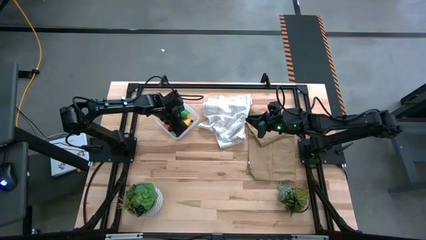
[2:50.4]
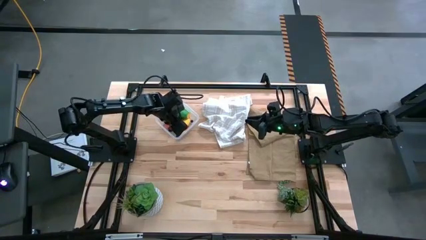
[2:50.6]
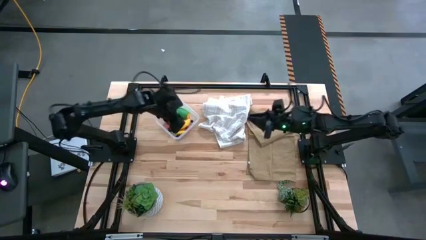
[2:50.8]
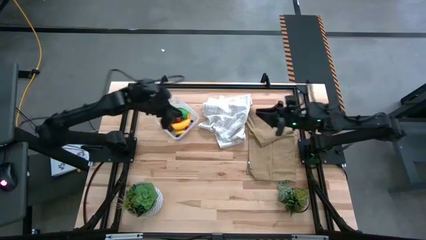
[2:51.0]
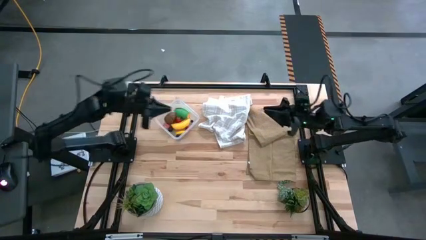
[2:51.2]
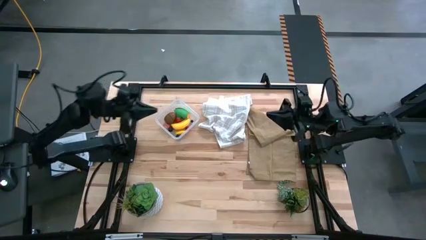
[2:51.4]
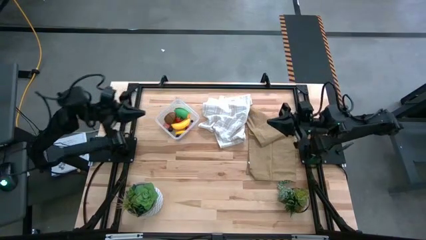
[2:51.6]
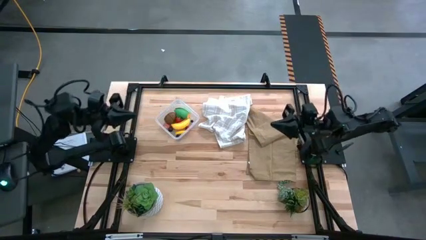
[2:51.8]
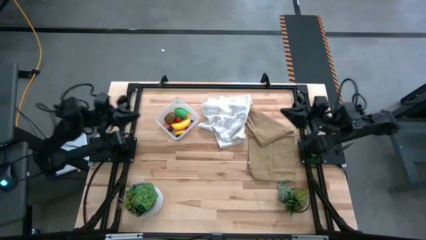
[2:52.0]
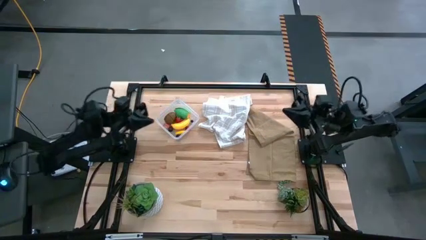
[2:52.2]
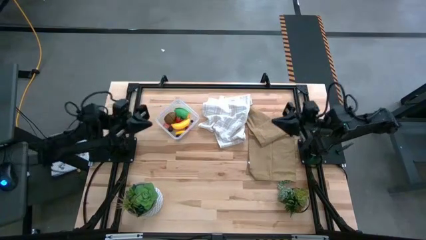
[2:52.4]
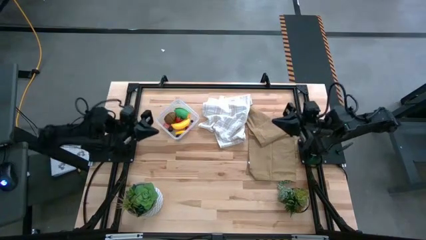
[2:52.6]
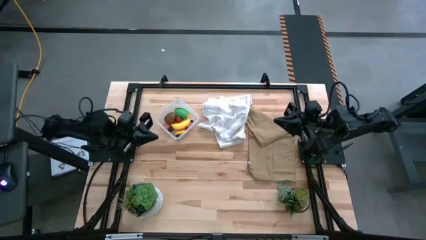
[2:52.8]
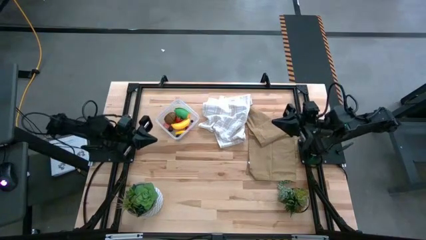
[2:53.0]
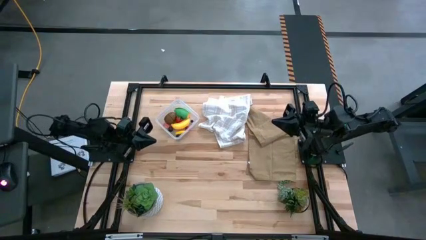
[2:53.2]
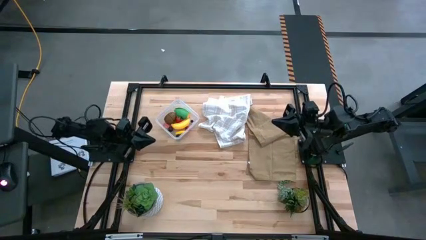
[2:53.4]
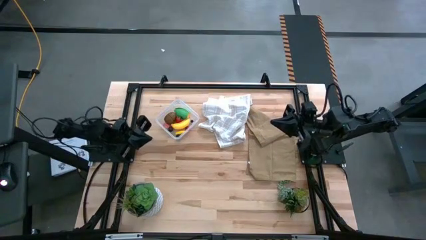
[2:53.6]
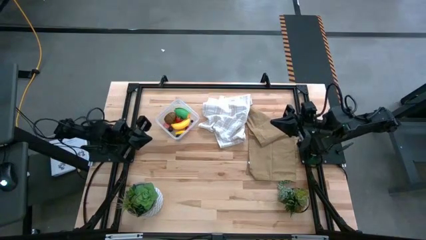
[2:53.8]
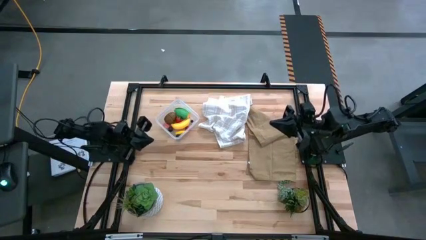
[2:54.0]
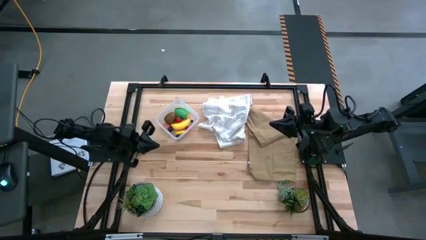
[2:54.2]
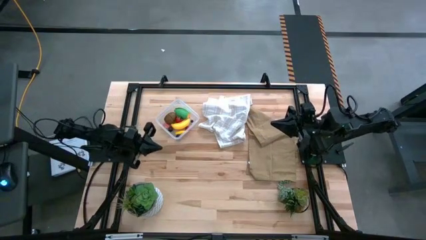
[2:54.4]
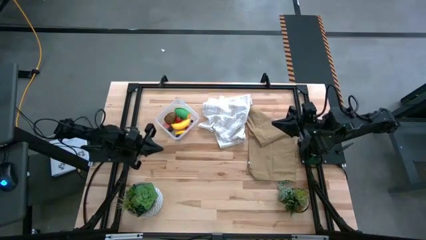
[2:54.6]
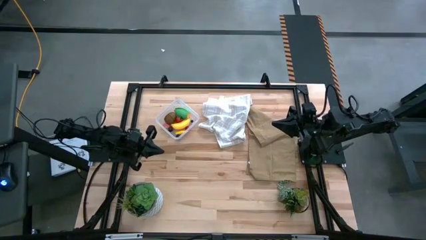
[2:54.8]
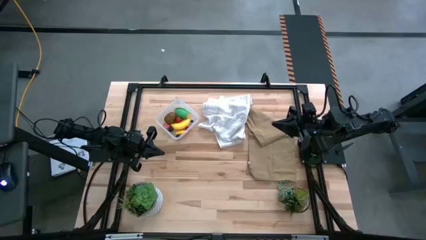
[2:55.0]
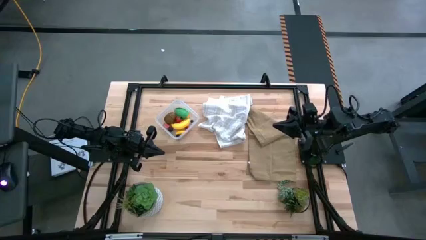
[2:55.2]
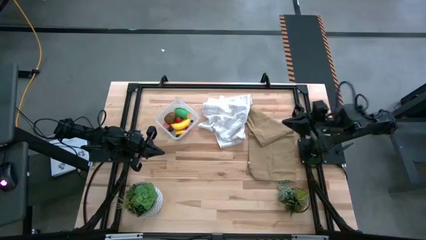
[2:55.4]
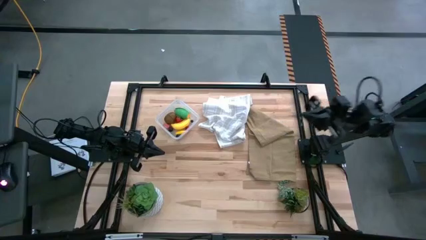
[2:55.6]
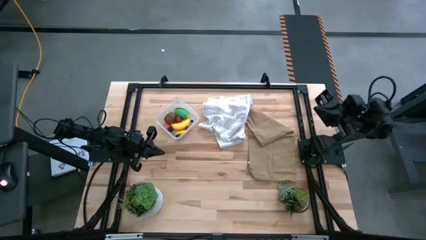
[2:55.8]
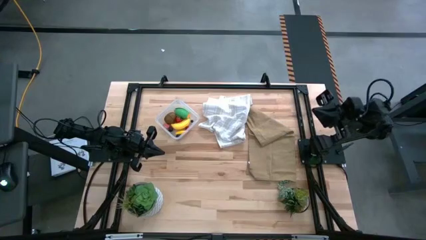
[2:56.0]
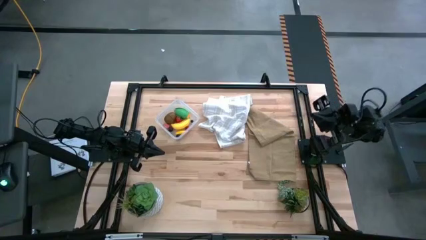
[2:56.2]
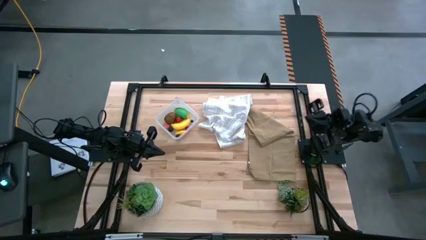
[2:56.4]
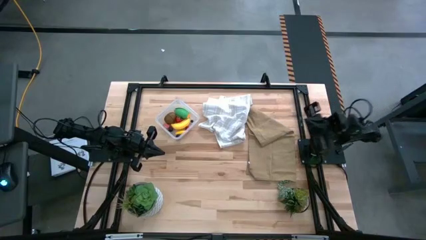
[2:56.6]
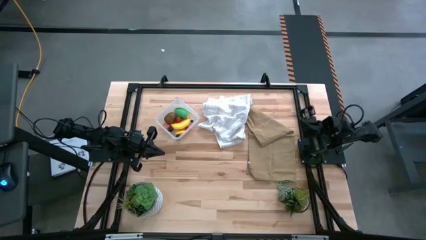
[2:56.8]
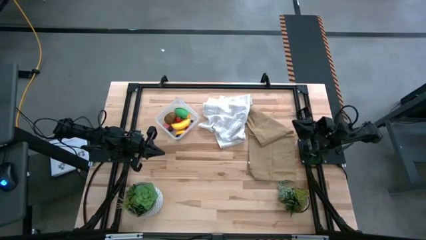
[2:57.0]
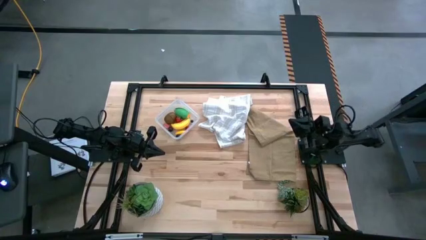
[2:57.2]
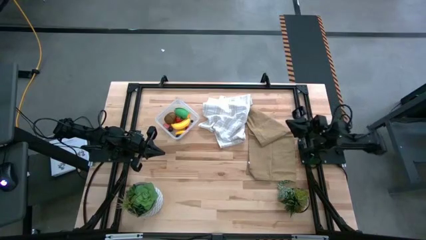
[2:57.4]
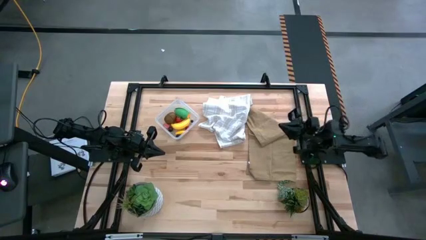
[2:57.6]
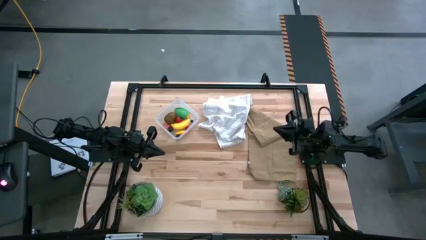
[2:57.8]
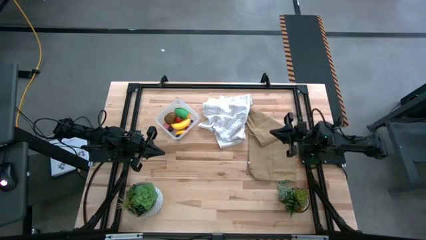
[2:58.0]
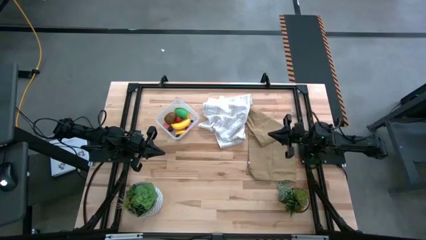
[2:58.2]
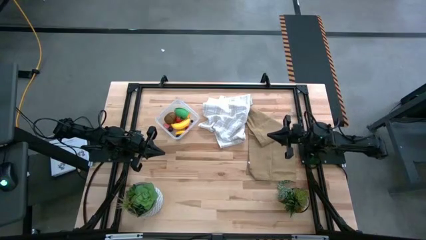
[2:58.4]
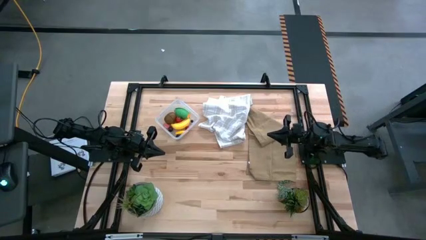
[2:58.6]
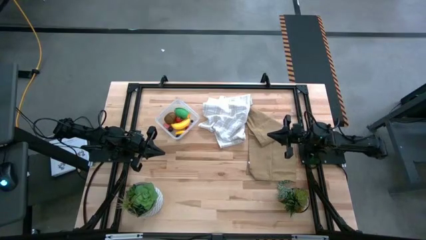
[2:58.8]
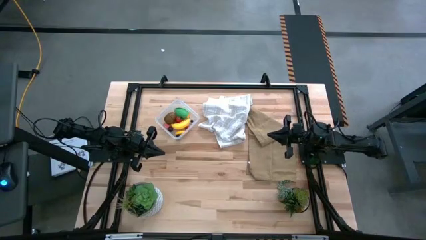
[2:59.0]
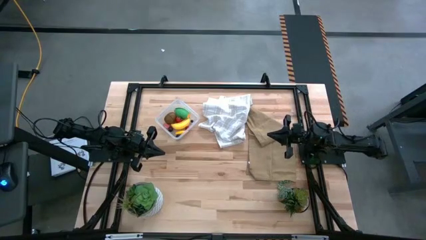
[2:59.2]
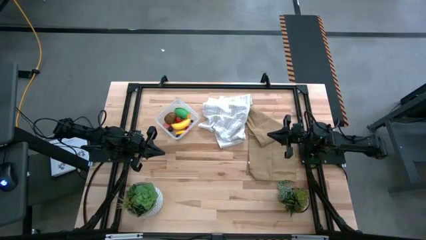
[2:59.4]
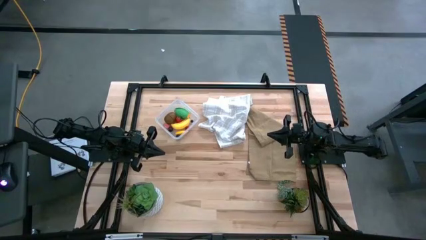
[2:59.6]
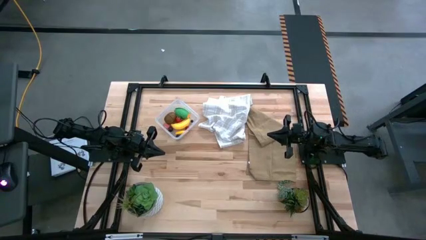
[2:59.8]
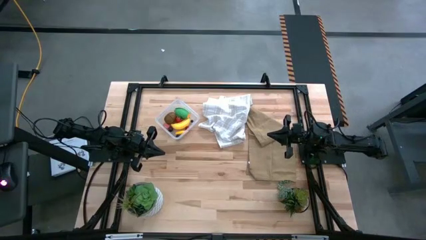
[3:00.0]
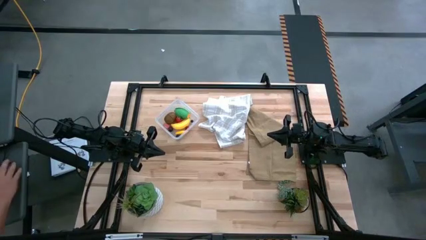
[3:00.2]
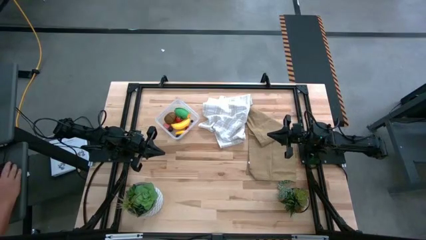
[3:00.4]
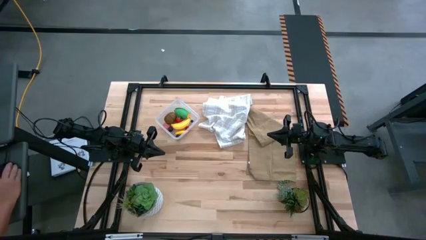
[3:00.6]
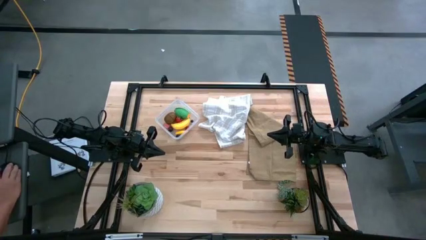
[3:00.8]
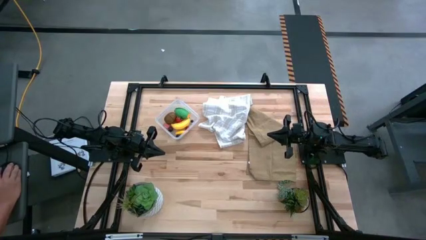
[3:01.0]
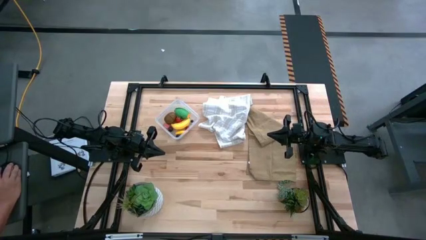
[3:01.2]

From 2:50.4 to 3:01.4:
Task: Pick and placing Produce into tupperware
Return to Home Position

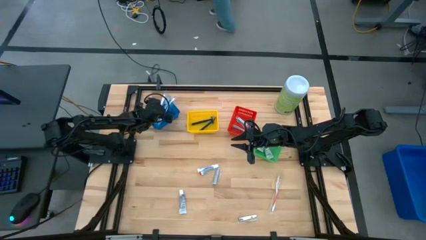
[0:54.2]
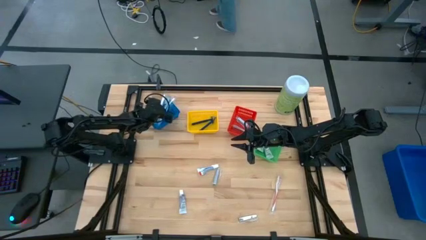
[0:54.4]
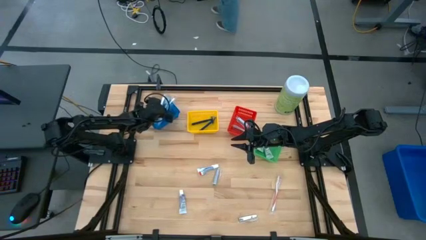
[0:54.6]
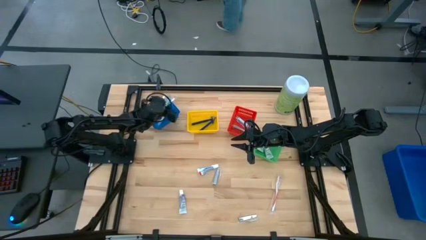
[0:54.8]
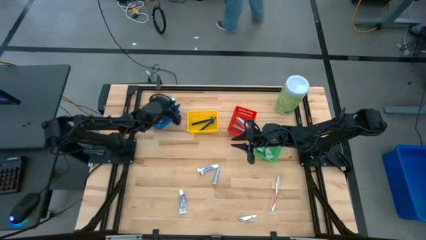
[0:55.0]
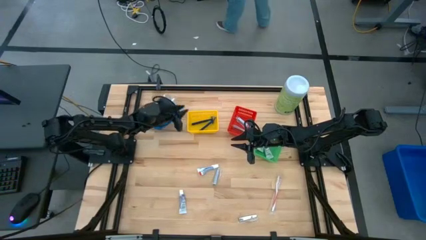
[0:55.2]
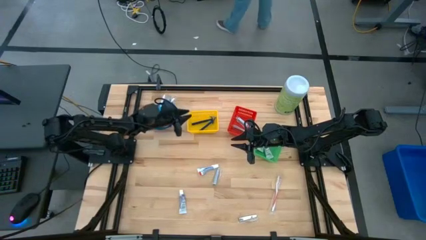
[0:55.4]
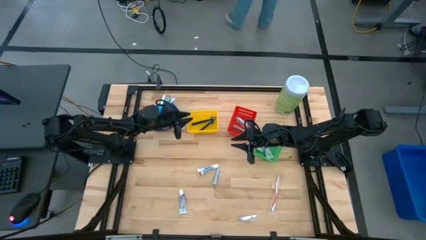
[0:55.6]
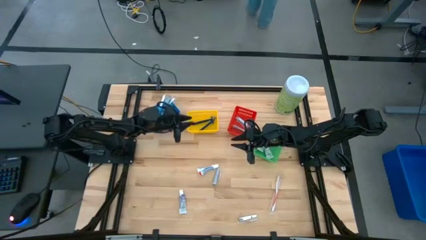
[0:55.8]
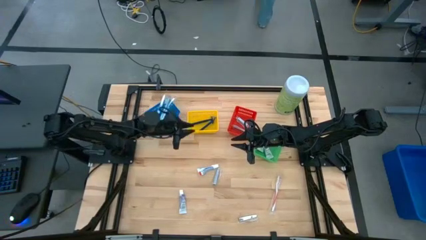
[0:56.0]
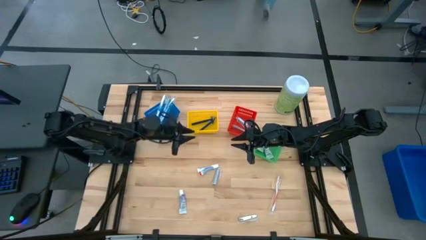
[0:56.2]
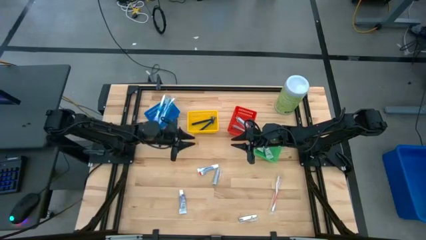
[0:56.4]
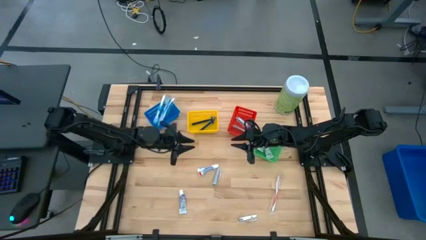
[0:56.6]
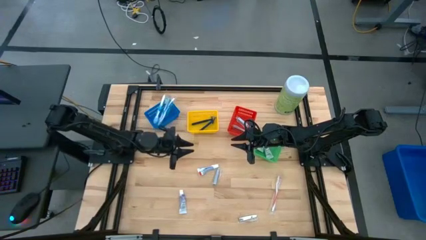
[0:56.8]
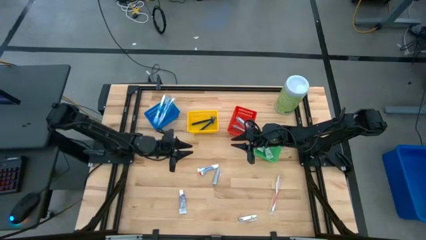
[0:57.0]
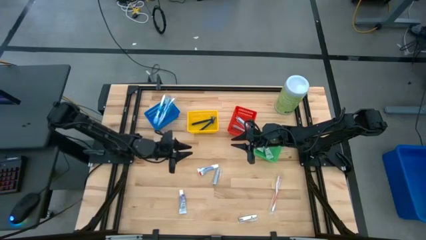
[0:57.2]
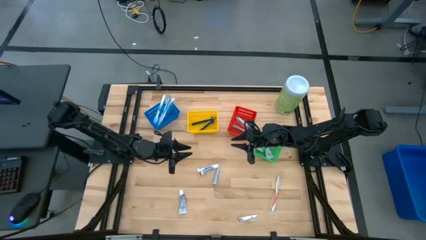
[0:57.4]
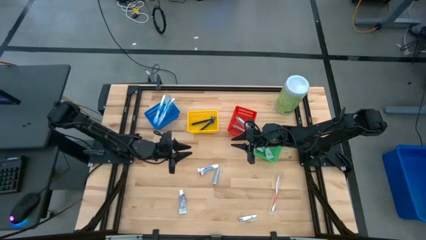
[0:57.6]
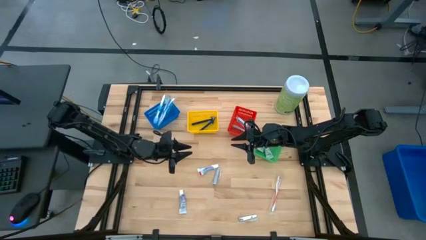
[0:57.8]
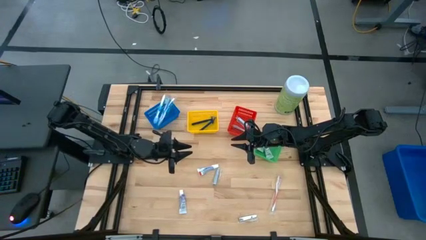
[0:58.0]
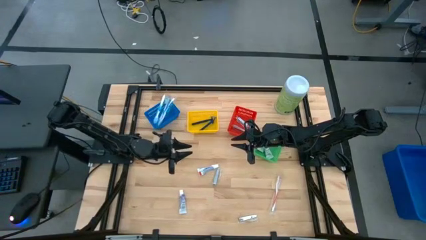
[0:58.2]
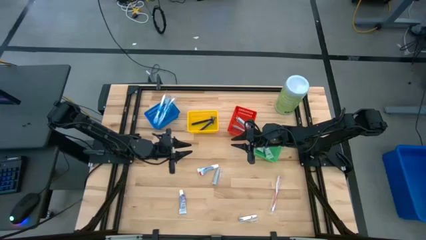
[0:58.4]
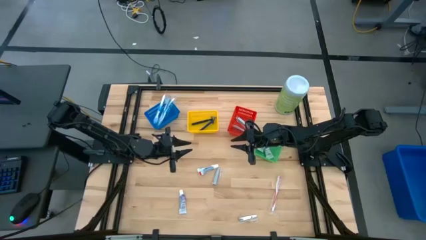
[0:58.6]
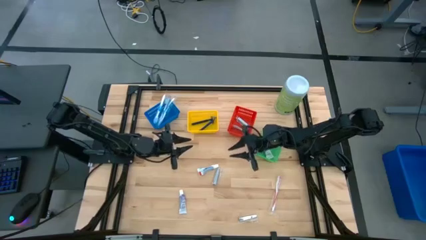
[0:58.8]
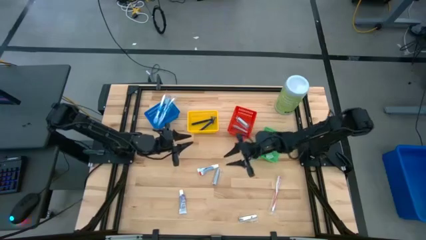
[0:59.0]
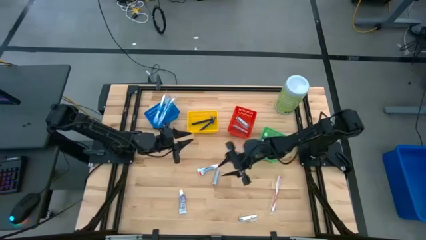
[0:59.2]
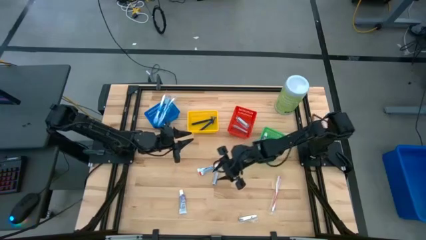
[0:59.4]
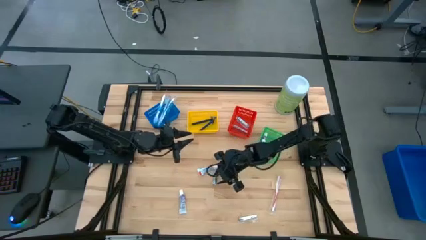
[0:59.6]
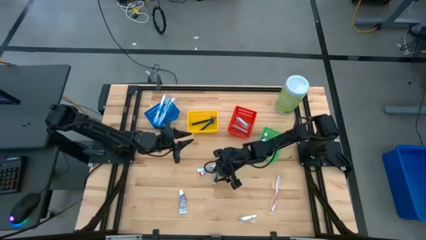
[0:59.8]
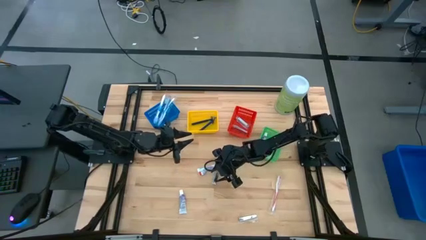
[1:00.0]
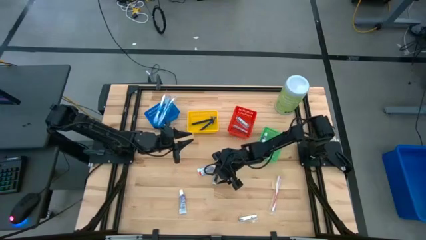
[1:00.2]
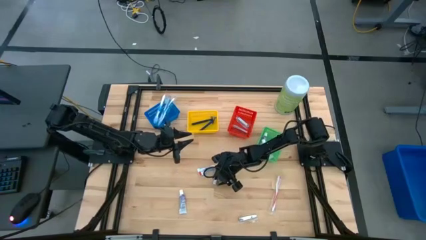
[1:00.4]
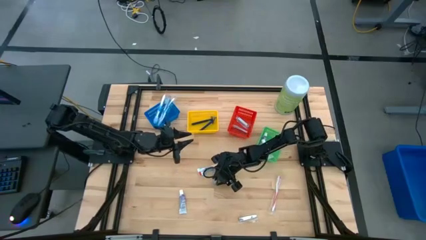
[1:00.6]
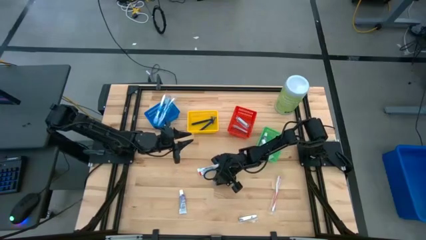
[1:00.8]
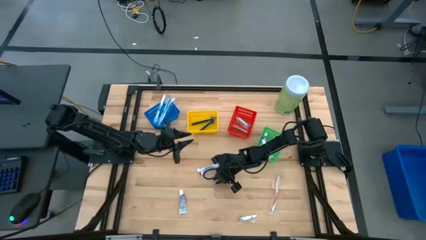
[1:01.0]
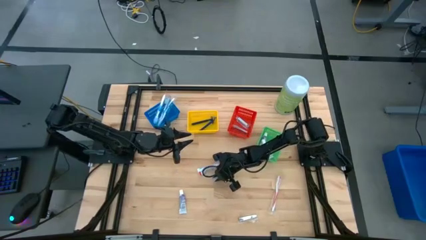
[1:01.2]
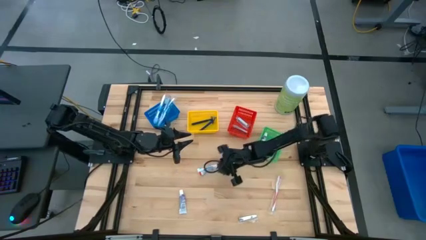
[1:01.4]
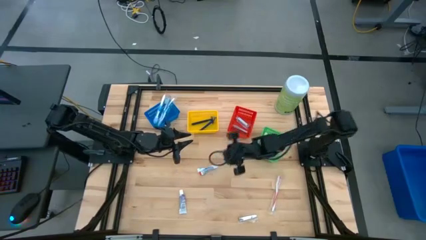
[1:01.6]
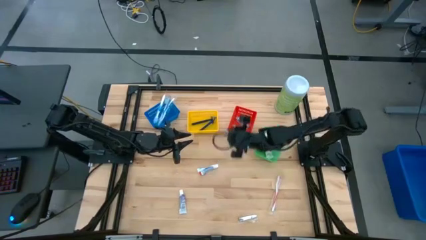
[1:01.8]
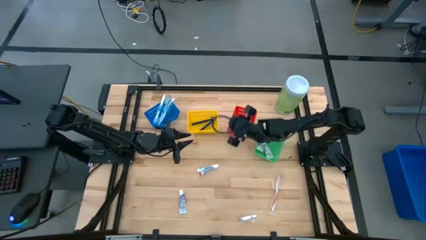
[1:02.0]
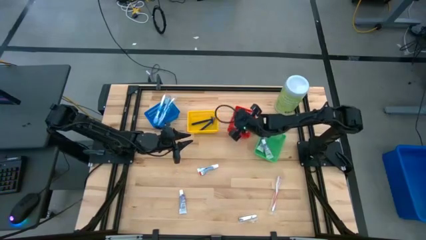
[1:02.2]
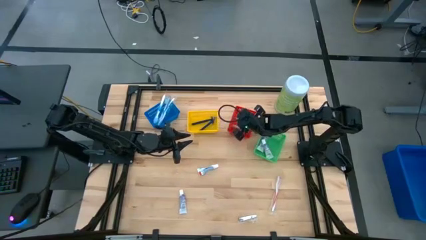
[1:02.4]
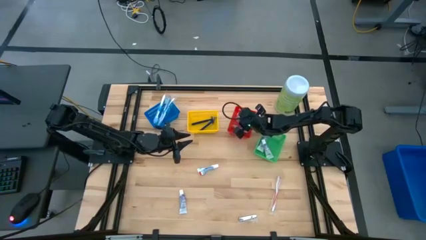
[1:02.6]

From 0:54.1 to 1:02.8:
Task: Pick & Place Travel size toiletries
Put the silver nail cutter into the red bin
